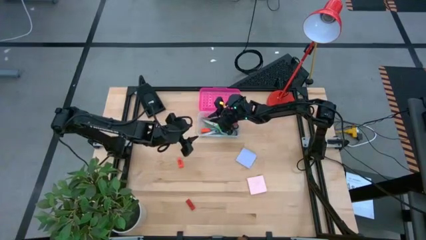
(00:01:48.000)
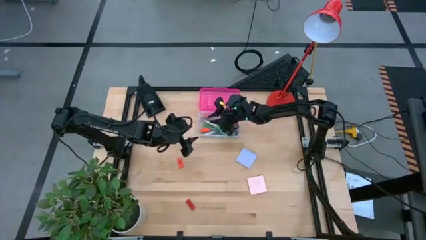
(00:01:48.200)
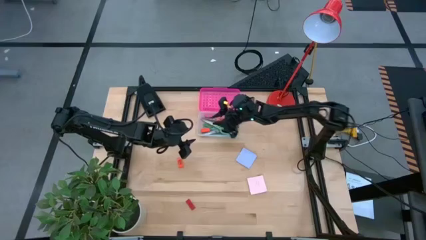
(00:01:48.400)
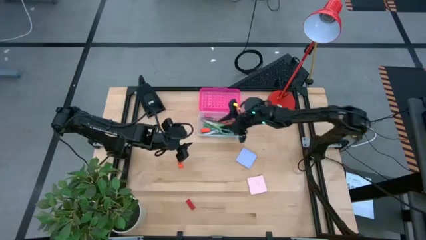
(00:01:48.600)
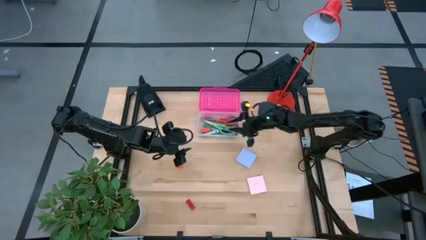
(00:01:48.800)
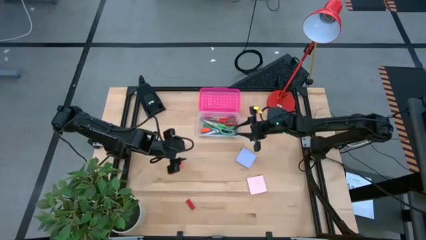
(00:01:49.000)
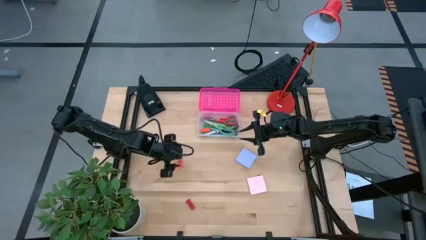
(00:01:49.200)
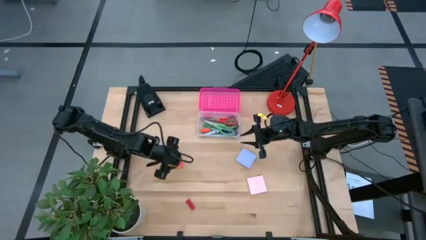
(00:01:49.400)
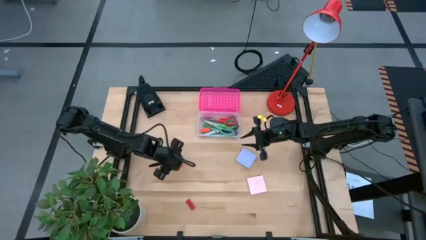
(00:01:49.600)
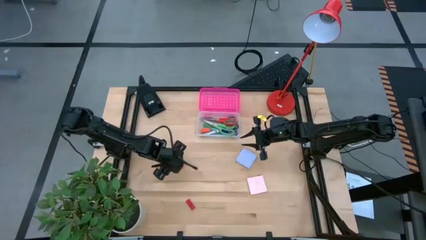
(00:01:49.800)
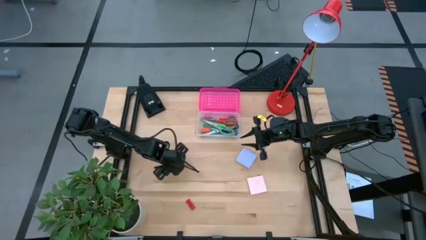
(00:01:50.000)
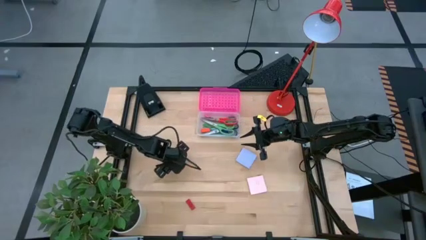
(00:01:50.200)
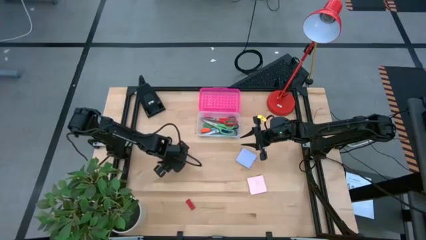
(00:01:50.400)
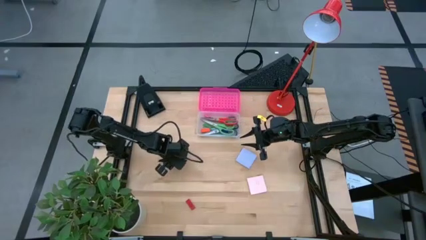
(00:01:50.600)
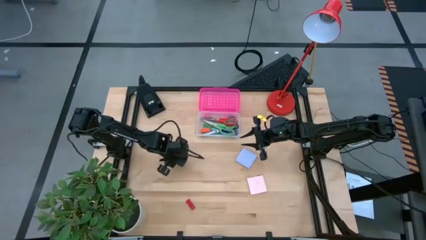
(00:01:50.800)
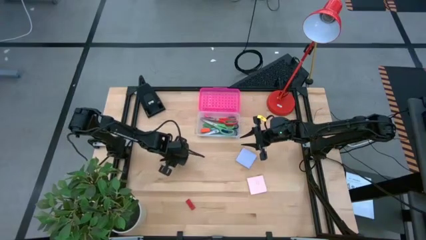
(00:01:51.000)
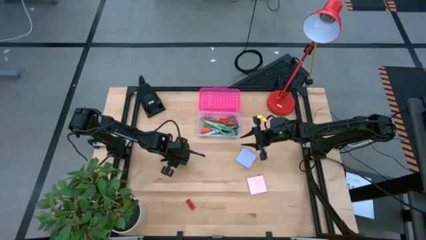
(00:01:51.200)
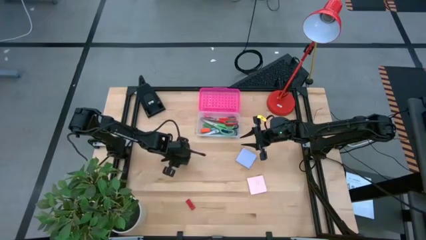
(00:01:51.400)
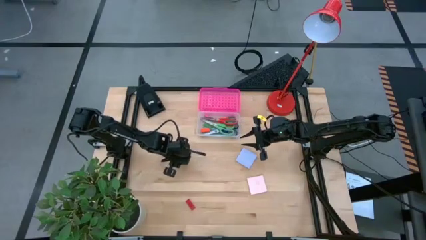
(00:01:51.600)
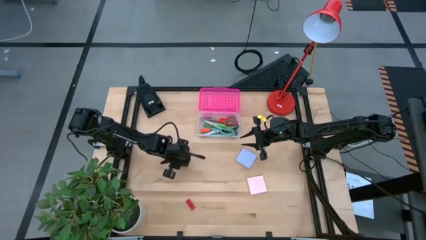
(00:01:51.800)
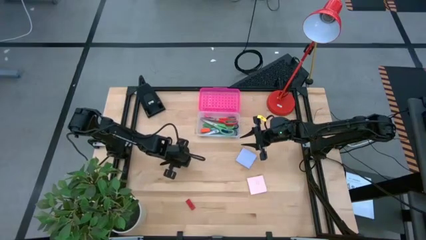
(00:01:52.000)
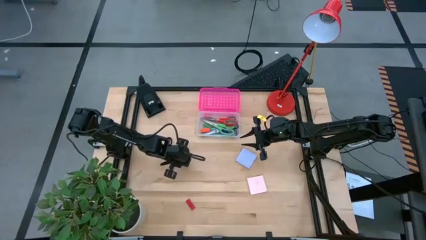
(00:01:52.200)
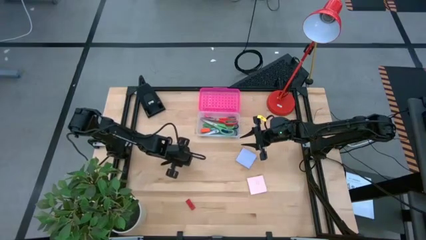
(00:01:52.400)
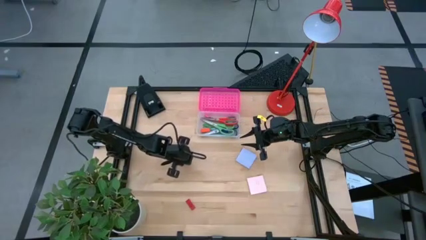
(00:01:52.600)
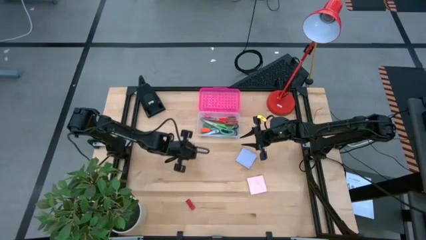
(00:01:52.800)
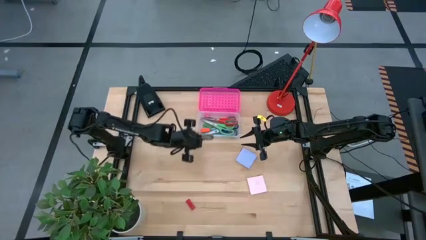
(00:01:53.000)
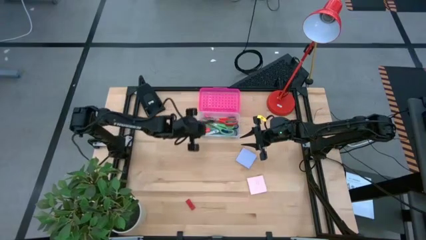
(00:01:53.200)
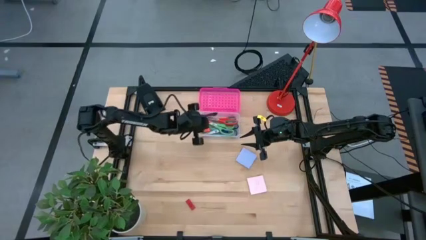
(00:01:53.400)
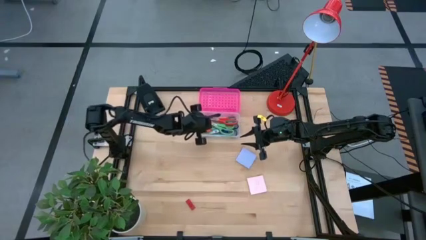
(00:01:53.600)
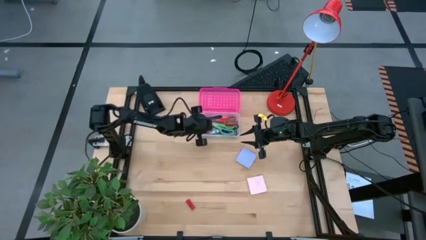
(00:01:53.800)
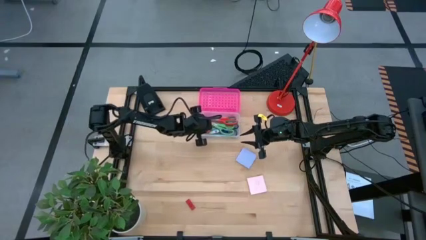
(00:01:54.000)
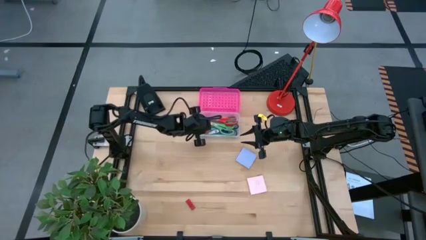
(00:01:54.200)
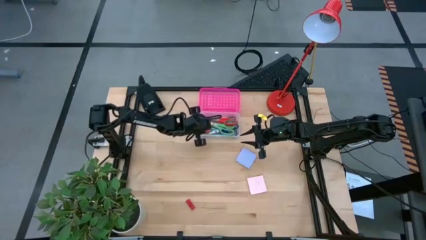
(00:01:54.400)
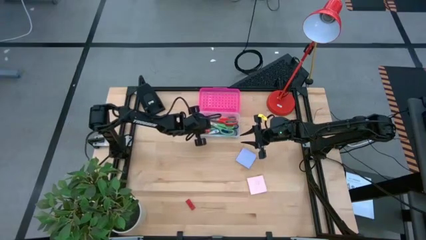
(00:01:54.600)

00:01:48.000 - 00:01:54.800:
Task: Pack school essentials
Put the orange eraser into the supply box

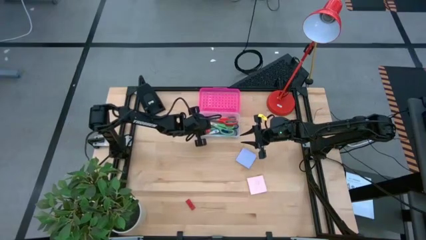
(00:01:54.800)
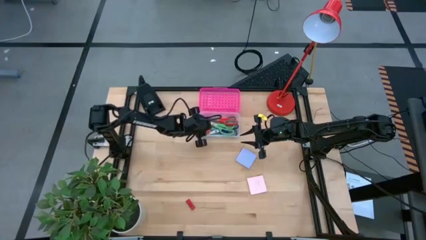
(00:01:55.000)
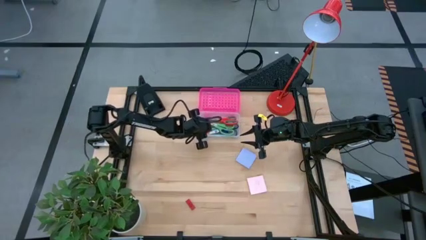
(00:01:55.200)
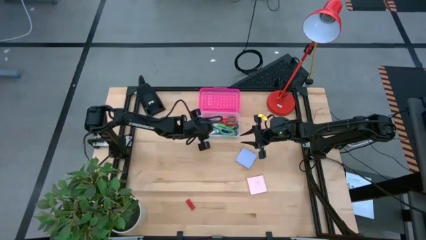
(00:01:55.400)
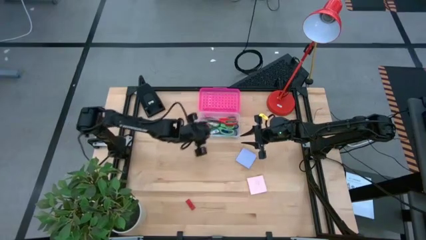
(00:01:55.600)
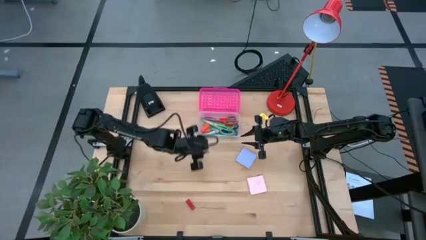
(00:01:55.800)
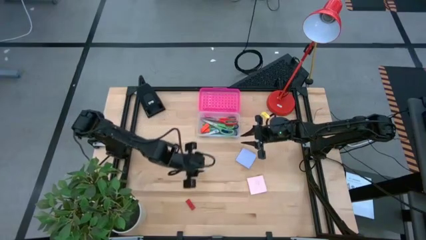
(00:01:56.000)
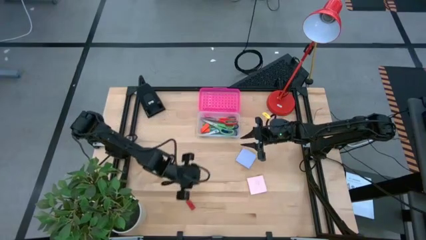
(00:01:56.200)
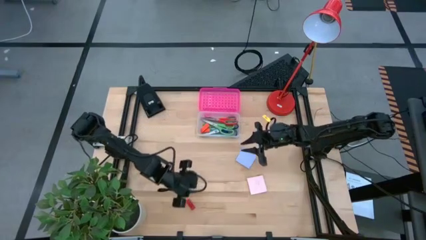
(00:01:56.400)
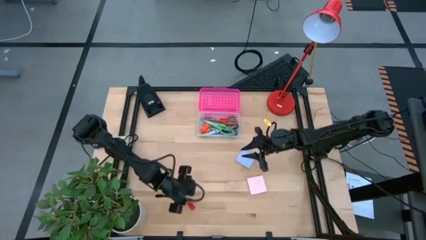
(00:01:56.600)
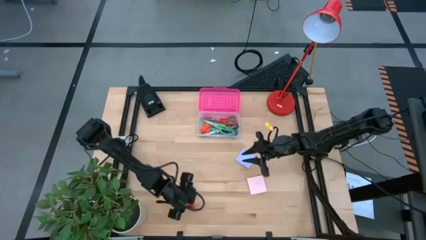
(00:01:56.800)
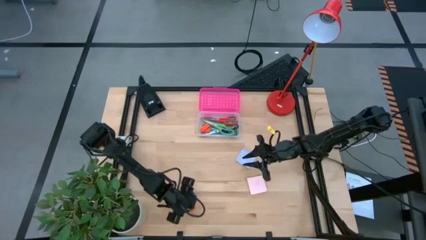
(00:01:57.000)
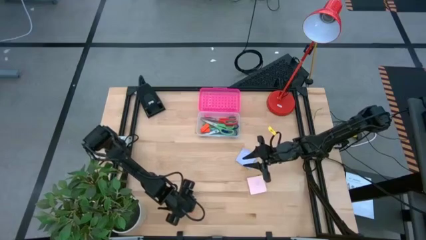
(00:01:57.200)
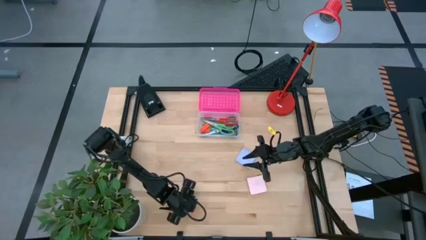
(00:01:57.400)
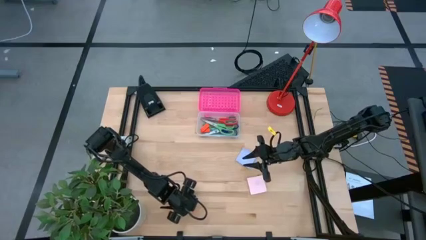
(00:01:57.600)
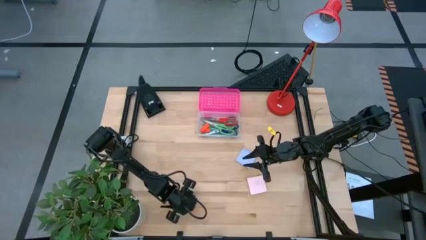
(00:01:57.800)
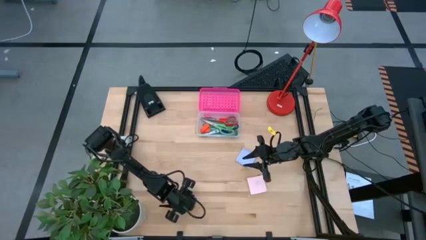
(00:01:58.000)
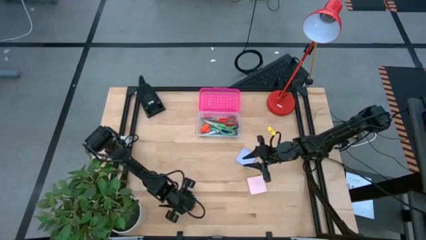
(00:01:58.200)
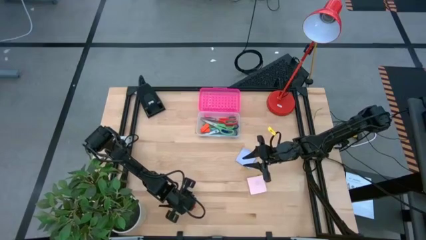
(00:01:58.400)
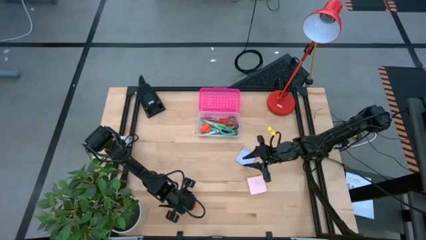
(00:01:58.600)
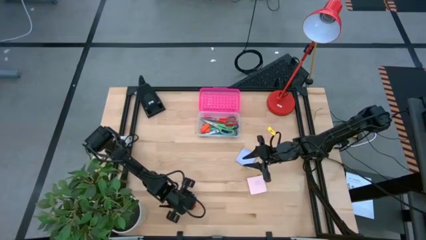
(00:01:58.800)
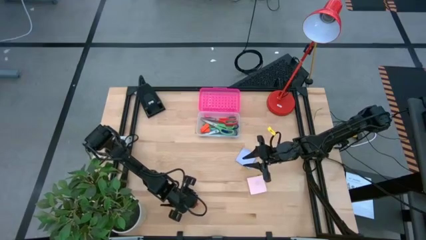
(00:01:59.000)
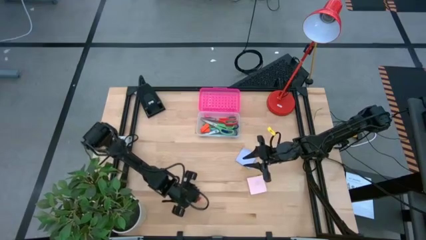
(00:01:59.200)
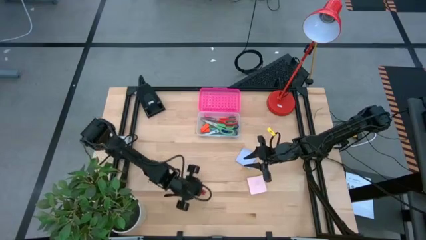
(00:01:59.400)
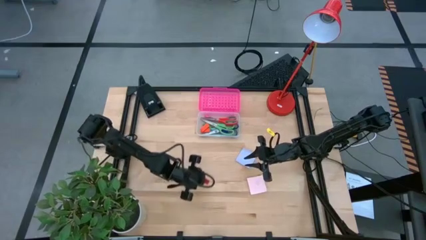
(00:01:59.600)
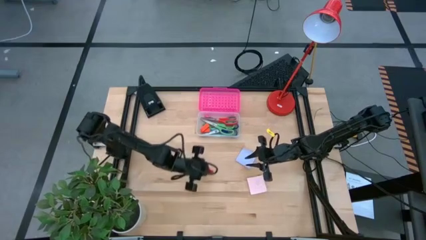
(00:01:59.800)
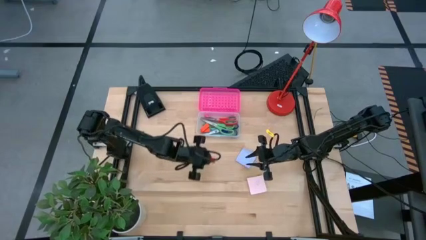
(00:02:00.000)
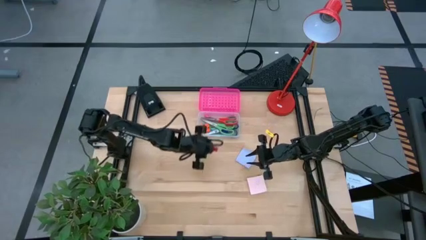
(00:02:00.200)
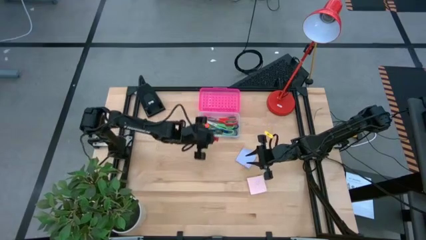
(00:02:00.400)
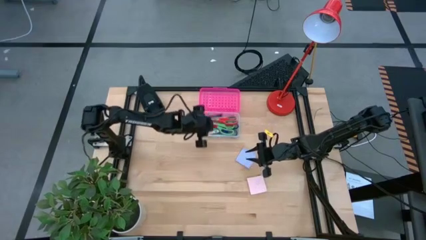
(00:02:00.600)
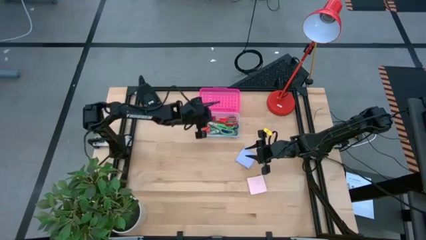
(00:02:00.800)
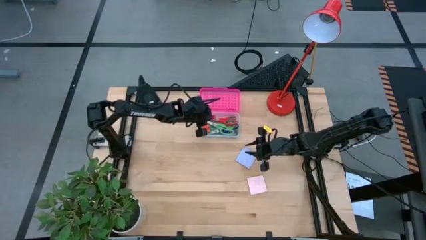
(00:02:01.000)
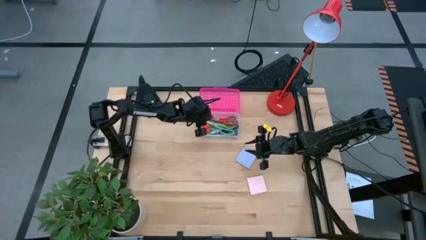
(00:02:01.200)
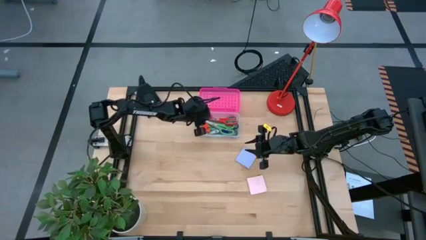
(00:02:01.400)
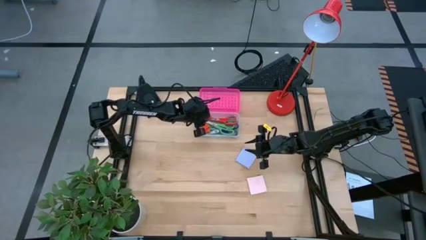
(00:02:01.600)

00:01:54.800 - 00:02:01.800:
Put the red eraser into the supply box

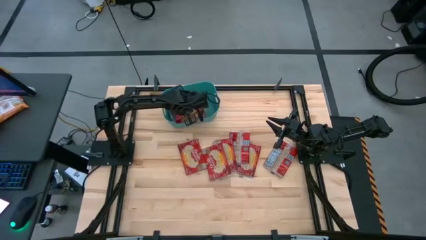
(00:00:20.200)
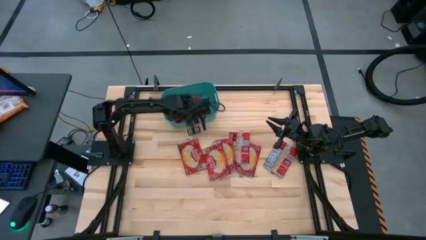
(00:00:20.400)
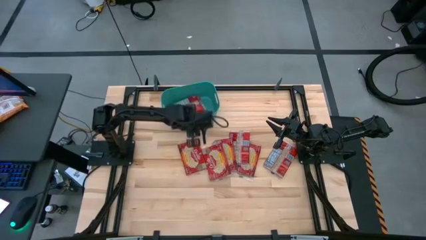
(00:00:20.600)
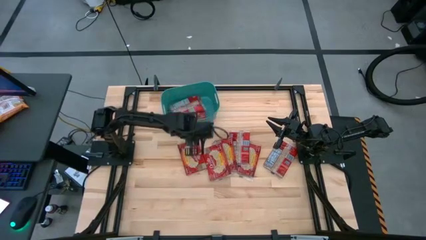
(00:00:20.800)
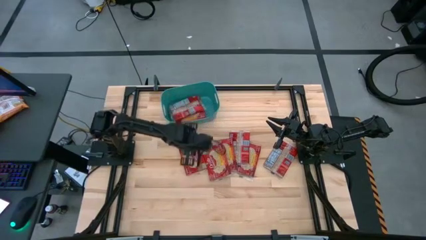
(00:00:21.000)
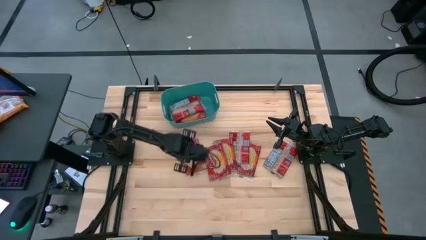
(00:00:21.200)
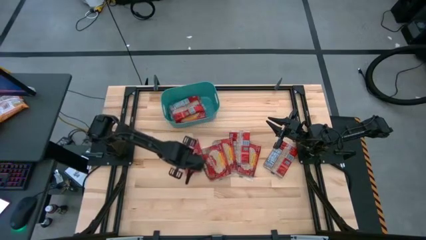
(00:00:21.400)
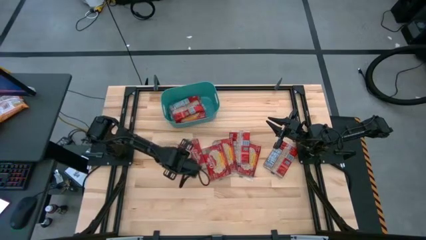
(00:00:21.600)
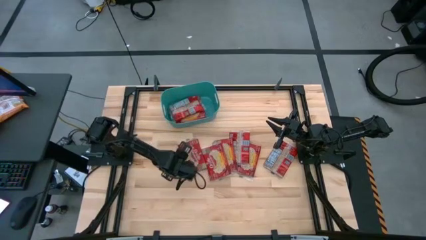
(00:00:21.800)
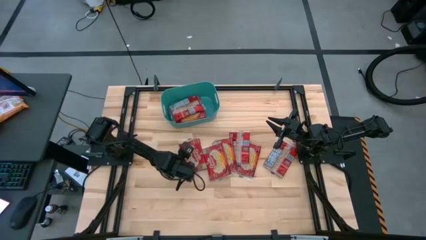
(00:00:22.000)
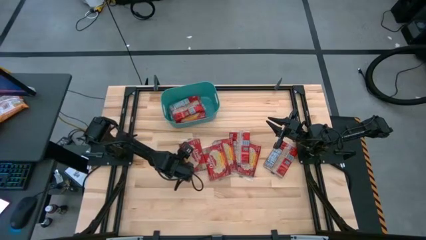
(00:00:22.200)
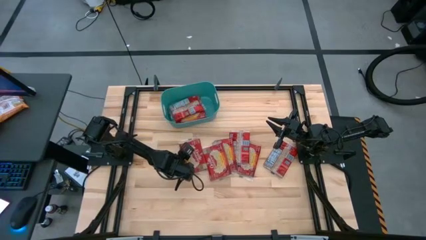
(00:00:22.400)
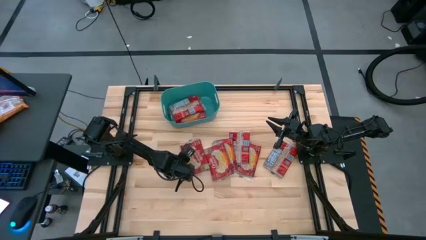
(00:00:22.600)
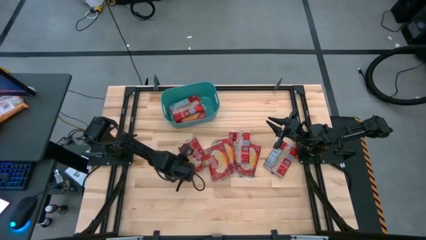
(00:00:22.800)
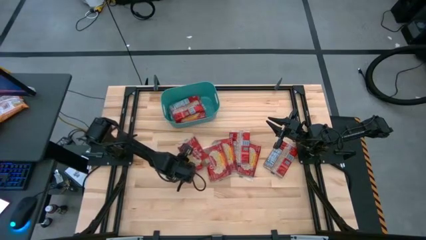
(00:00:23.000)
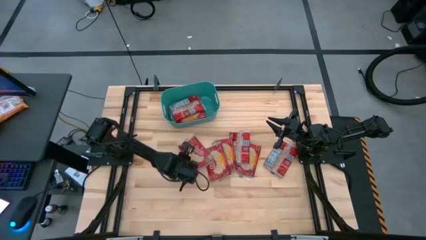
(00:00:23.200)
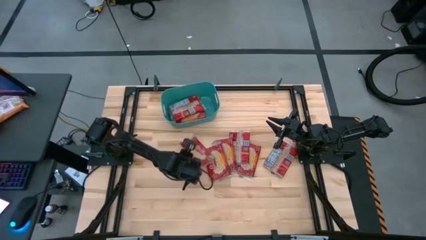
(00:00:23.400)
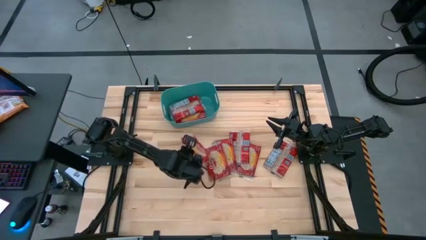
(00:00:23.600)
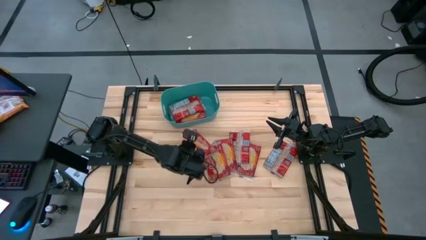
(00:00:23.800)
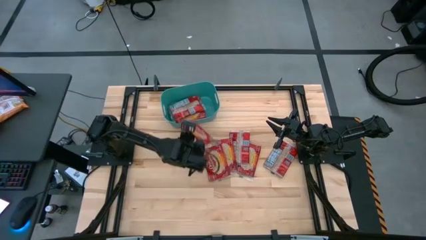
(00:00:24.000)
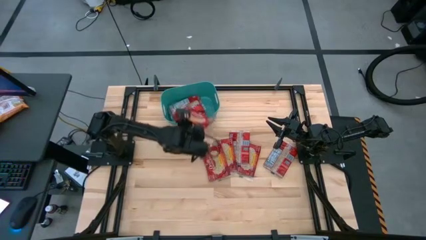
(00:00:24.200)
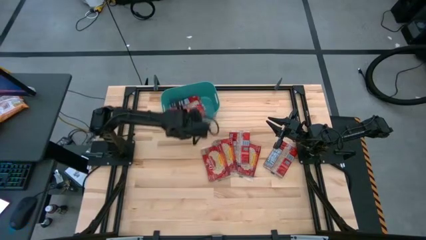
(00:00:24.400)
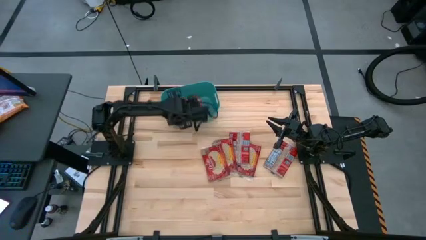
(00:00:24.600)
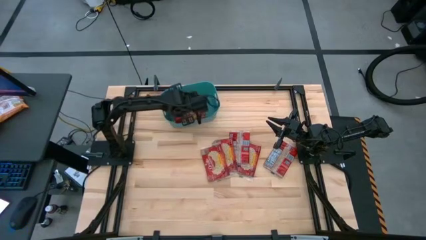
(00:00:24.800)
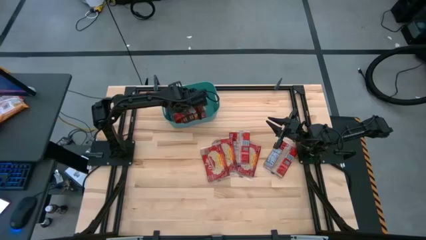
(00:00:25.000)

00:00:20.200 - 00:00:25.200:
Task: Sort popcorn bags into baskets
Stack the popcorn bag into the green bin
